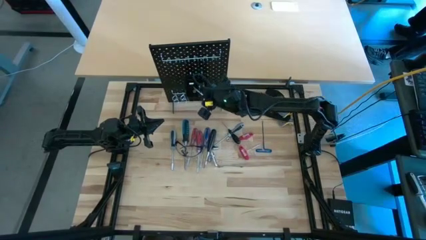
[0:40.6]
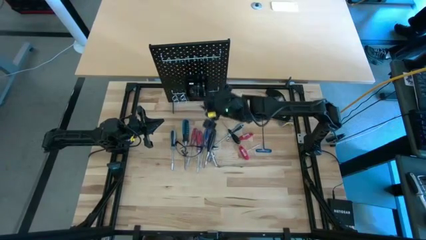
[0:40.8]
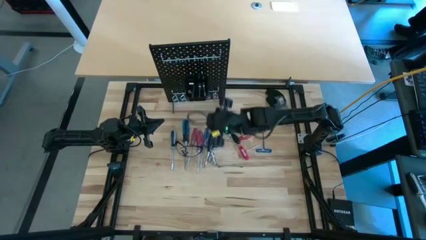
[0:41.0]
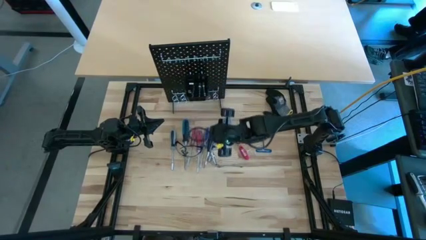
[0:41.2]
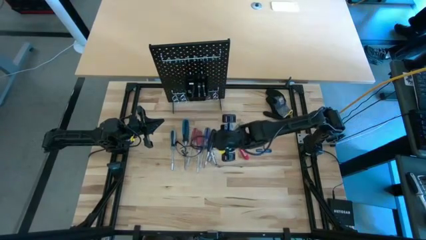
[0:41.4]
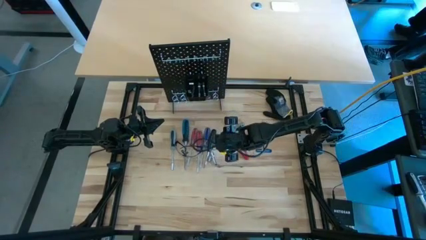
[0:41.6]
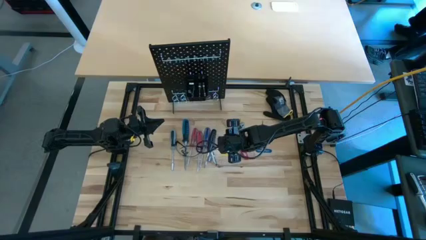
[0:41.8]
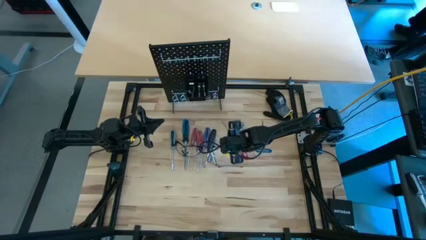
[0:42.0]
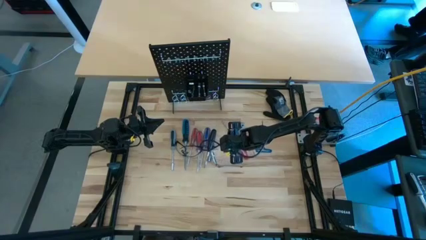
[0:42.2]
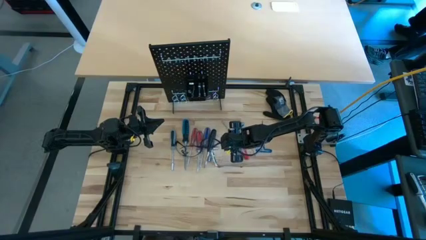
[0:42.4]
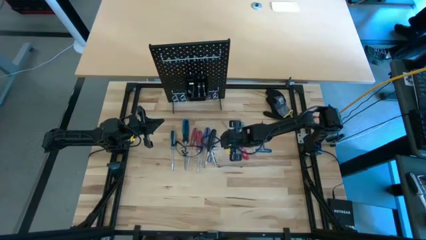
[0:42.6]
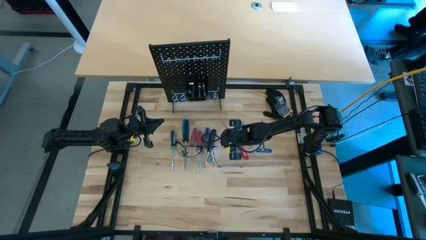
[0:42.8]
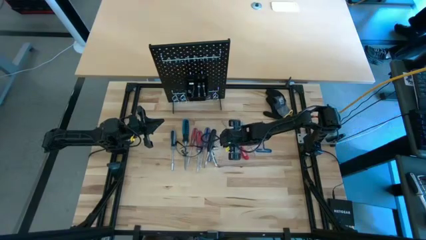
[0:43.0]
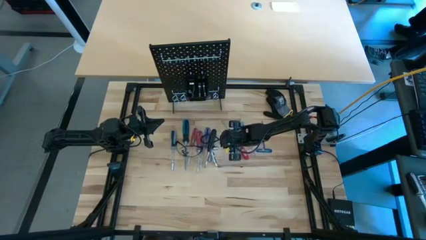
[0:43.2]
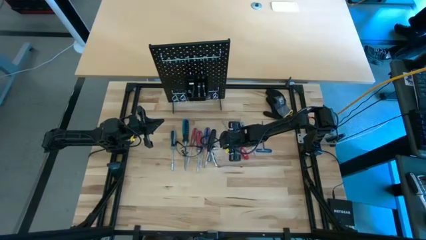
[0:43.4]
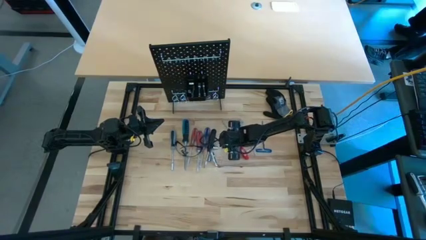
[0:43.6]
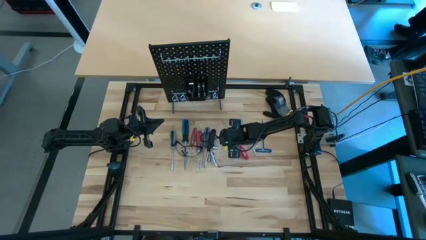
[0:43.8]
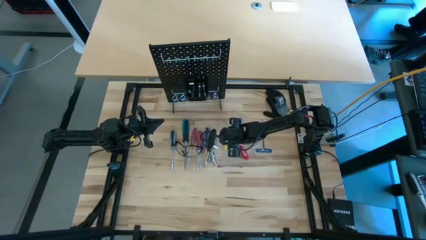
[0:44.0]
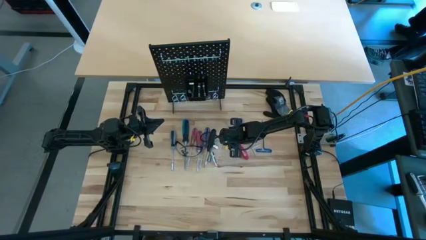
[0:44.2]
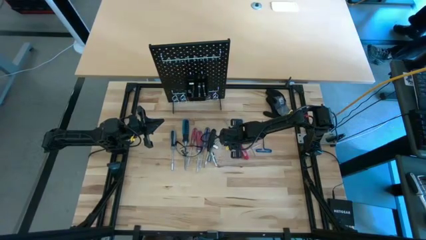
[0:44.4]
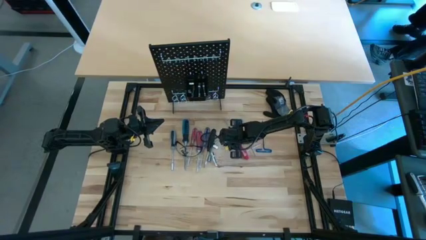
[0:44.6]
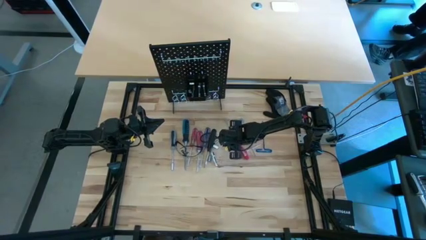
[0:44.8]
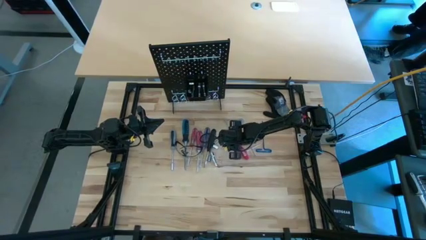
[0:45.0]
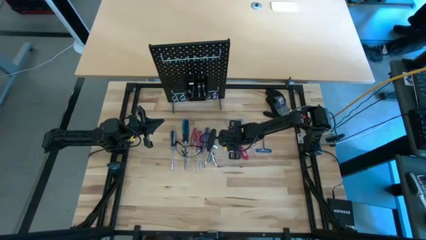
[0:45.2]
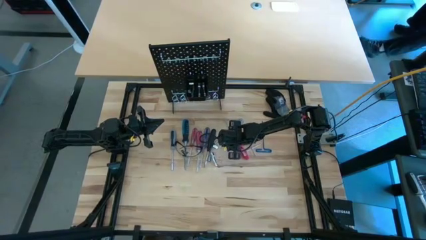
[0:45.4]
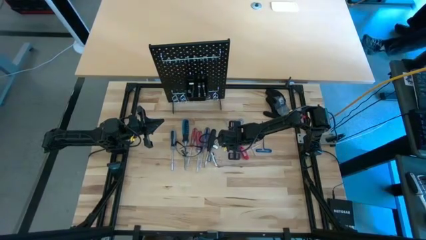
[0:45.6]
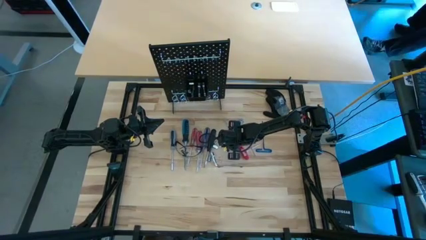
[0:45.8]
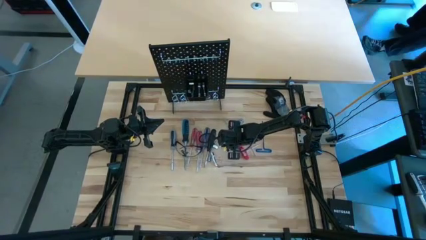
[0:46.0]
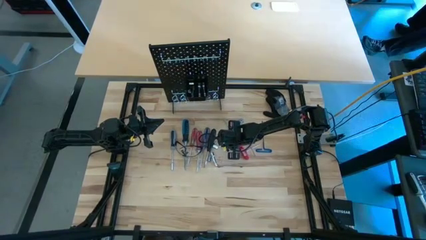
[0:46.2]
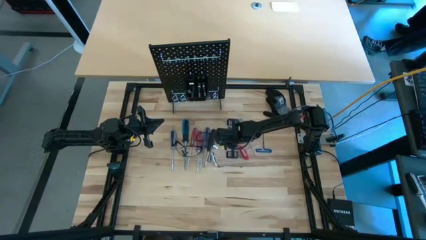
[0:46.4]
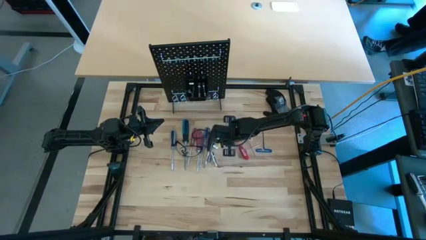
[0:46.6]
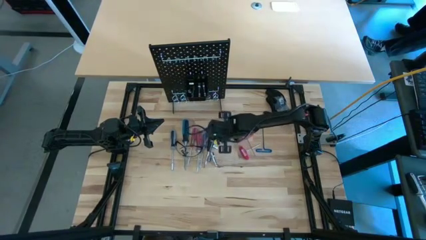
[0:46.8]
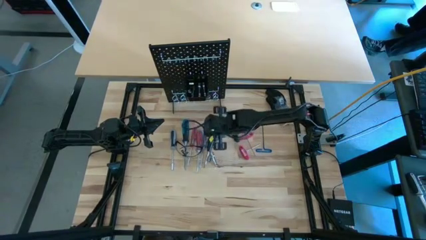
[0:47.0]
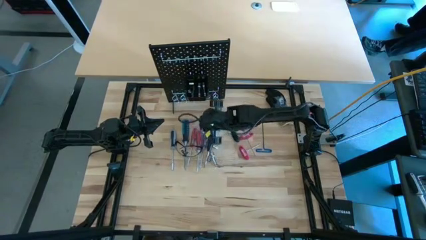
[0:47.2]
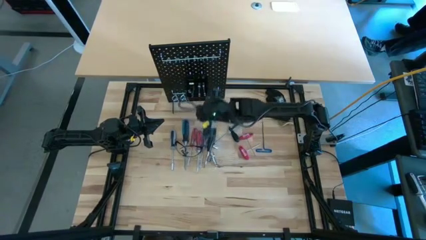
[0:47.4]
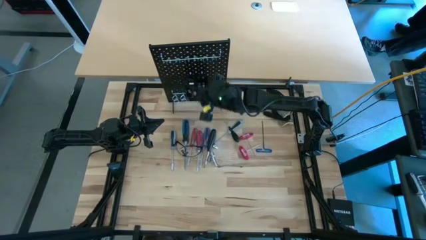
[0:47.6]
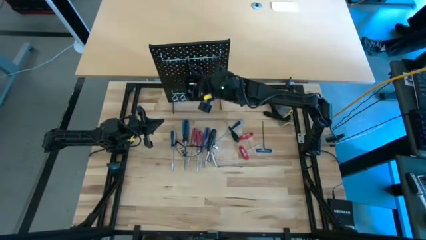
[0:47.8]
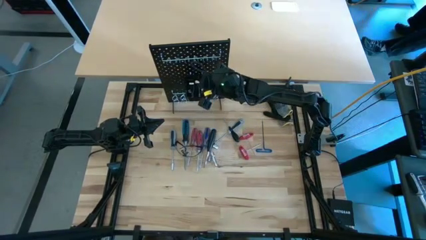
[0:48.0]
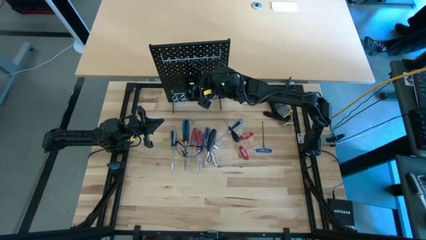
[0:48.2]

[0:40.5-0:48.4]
Task: Hang tools onto peg board
Put the top right metal socket into the black bin on the peg board

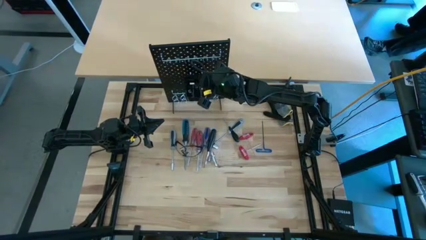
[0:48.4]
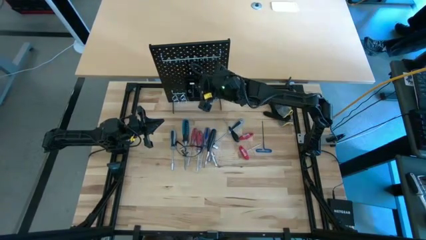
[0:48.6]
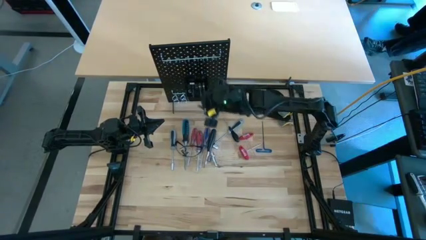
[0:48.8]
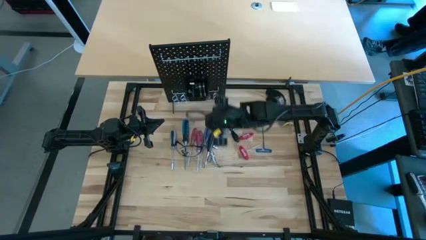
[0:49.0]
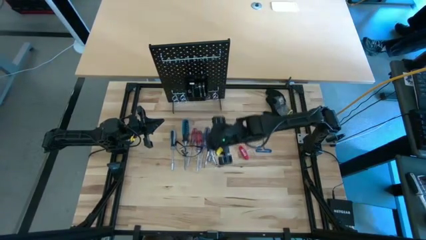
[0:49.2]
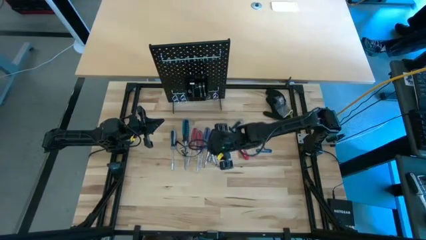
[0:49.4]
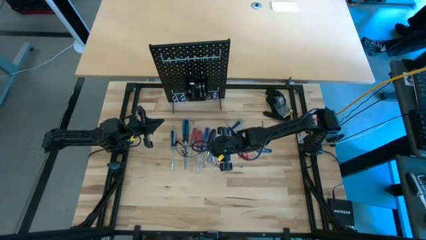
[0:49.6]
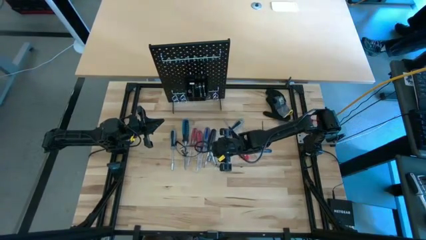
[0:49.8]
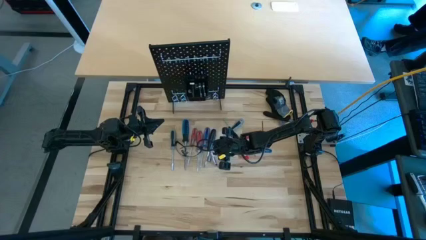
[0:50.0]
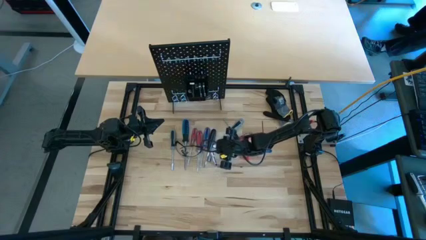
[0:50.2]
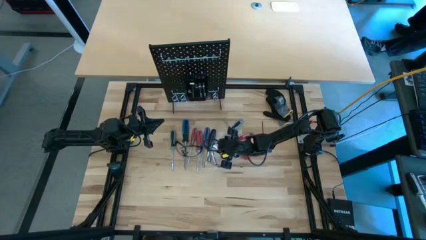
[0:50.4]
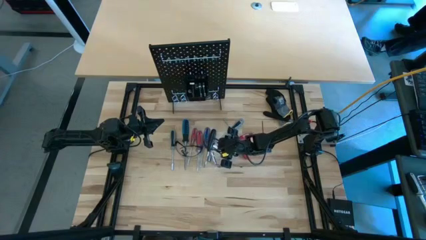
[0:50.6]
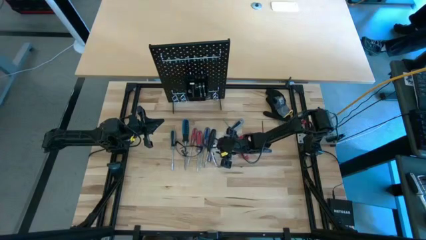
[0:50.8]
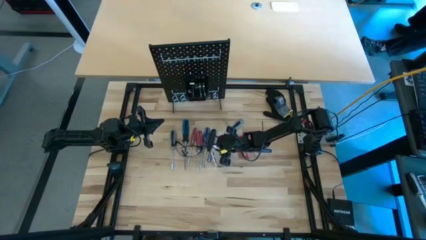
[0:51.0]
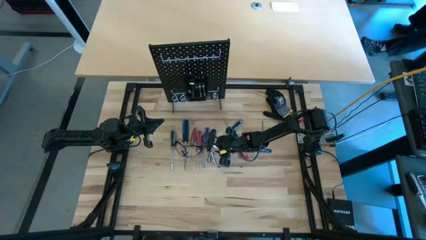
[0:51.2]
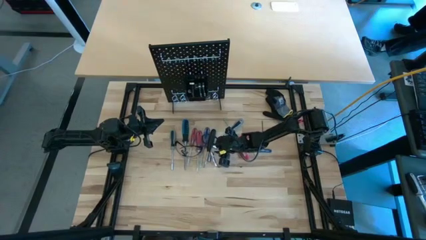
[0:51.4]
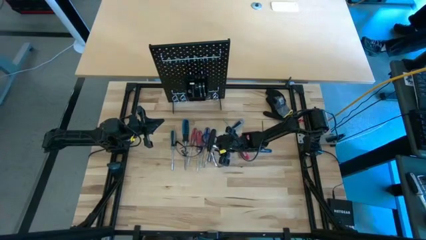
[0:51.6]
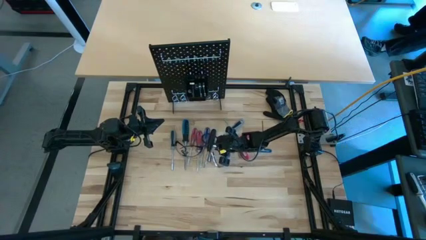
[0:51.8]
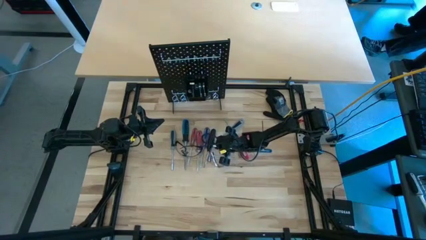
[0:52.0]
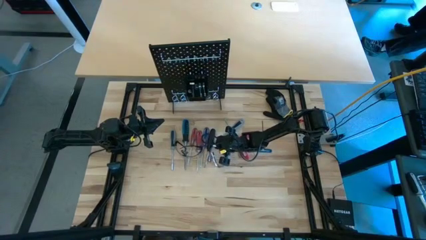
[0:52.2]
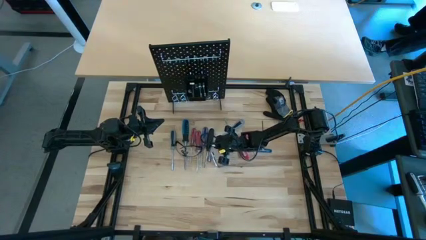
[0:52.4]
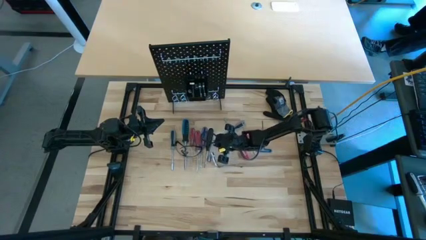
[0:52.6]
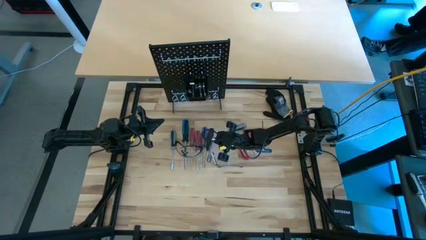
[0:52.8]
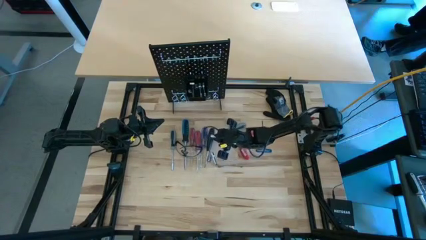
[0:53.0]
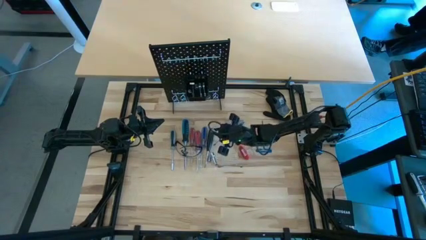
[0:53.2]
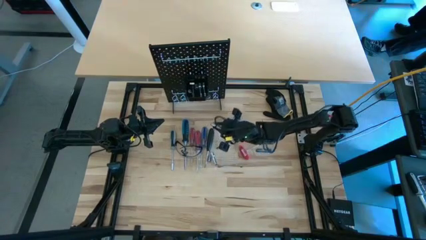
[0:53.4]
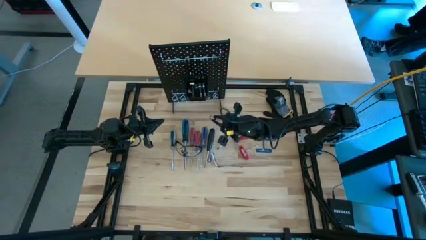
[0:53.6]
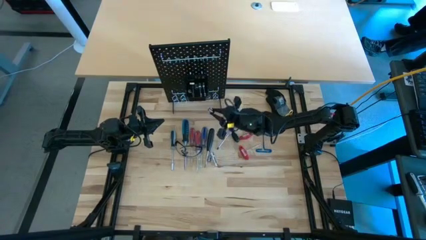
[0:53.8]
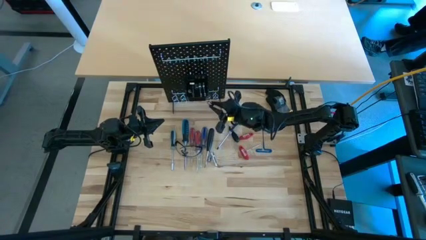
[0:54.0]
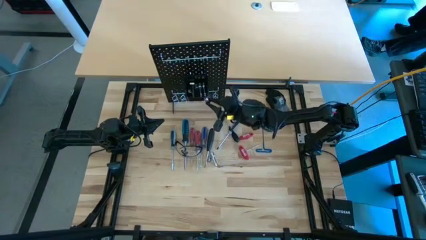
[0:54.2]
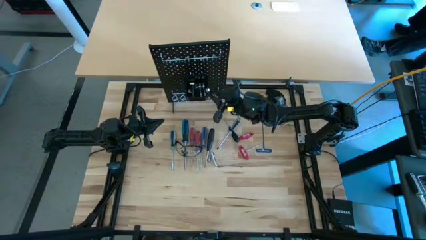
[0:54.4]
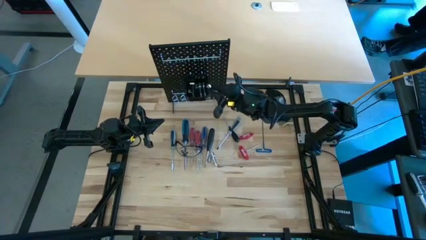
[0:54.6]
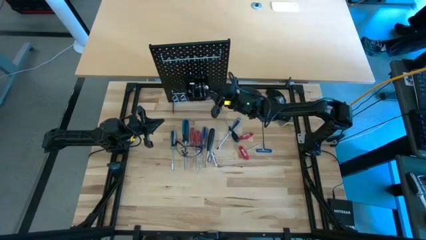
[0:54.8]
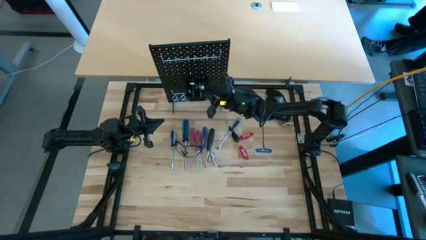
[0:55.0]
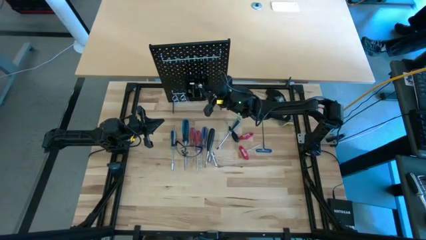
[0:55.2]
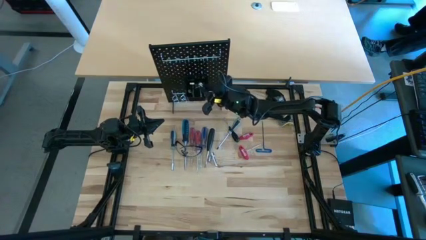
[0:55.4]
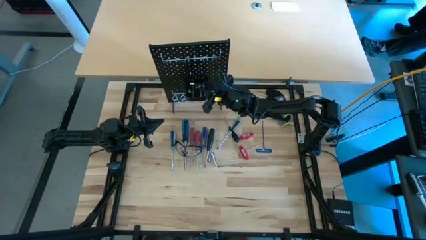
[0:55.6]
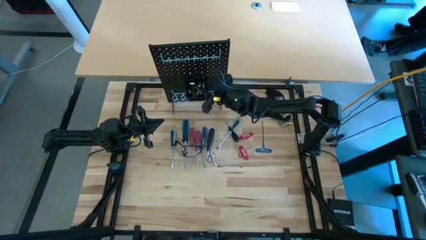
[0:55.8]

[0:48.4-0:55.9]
Put the top metal socket into the black bin on the peg board

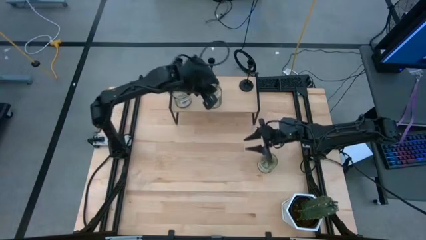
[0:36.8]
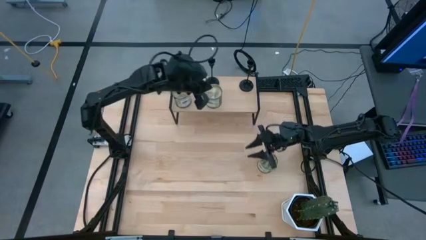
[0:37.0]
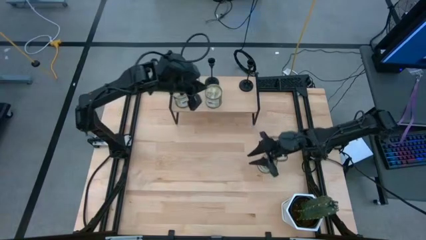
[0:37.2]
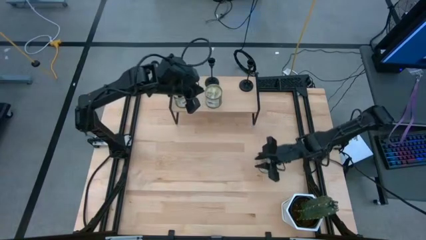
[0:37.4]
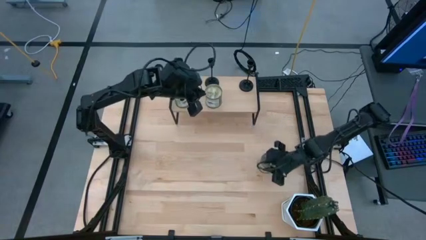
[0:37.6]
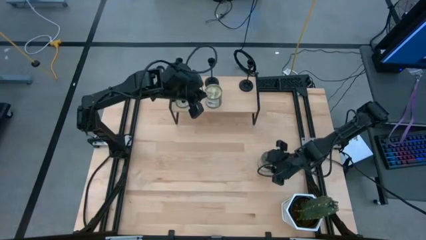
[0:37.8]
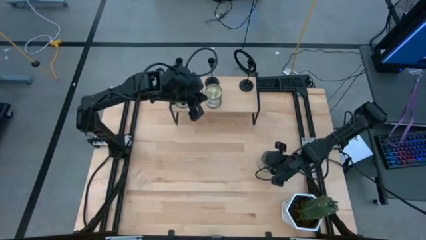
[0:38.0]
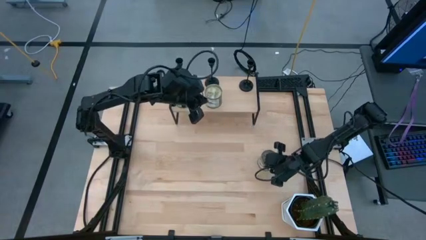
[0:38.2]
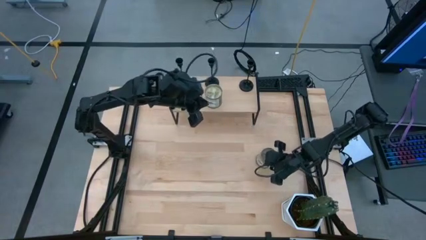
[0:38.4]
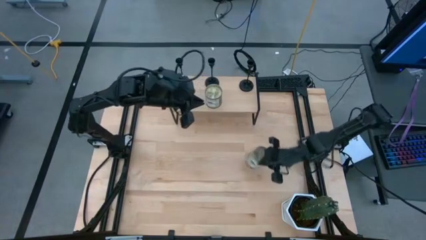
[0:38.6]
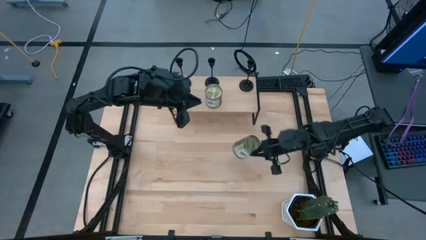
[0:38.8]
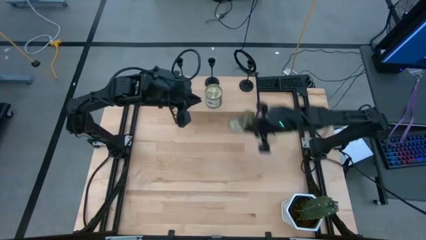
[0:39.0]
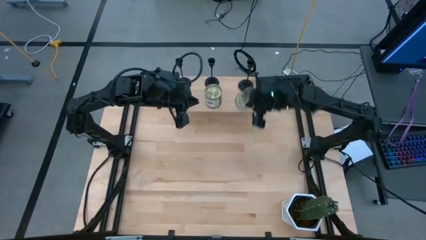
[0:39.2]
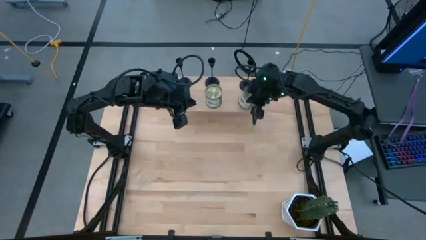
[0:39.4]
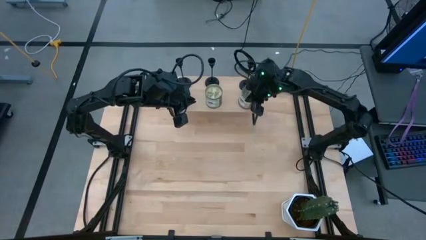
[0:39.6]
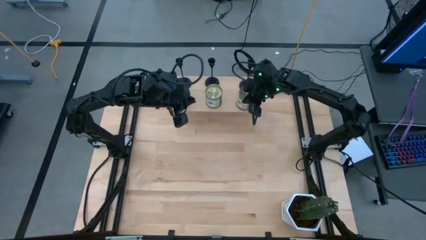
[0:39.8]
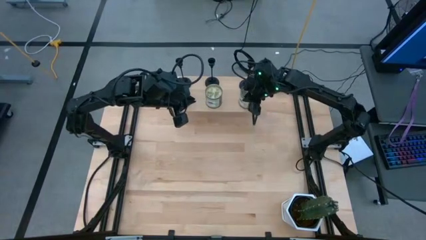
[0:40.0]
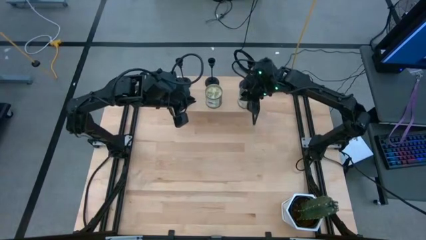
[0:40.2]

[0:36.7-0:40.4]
Task: Pick & Place candle stick holders
Put the scented candle on the shelf
